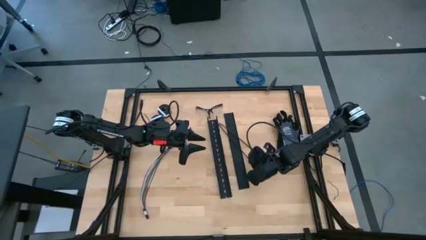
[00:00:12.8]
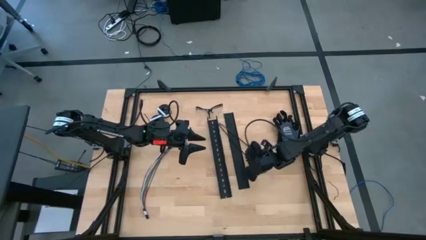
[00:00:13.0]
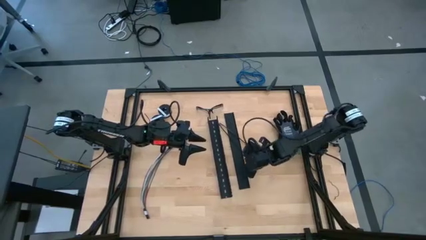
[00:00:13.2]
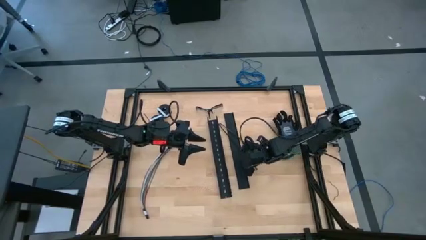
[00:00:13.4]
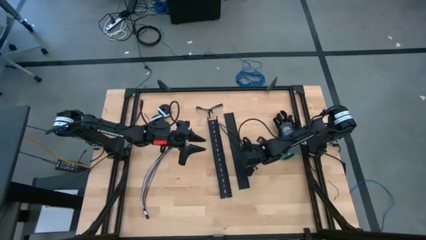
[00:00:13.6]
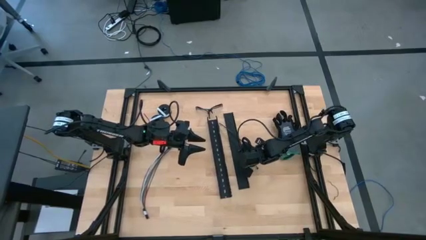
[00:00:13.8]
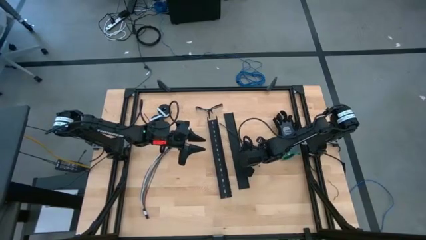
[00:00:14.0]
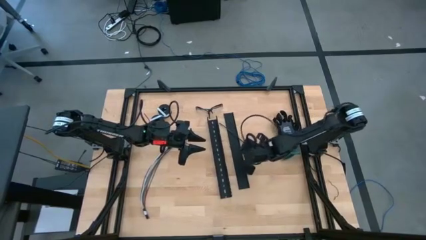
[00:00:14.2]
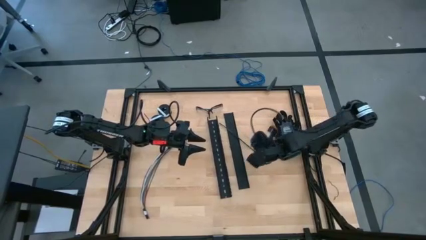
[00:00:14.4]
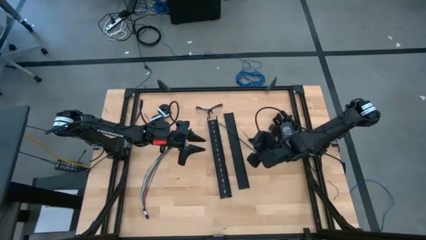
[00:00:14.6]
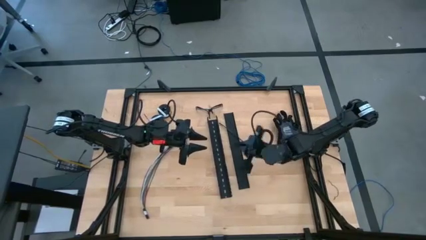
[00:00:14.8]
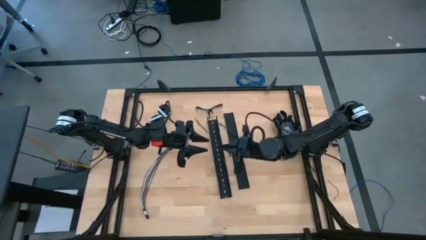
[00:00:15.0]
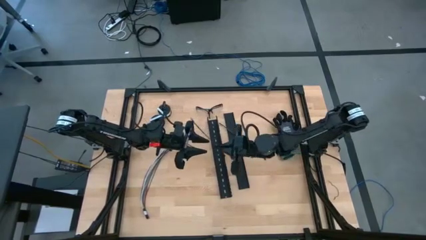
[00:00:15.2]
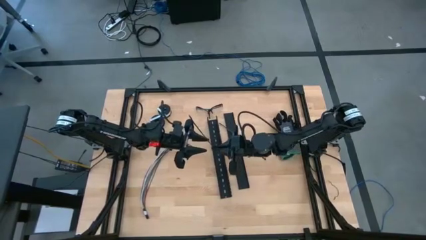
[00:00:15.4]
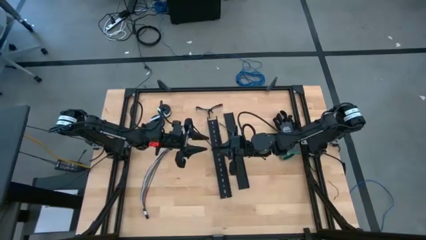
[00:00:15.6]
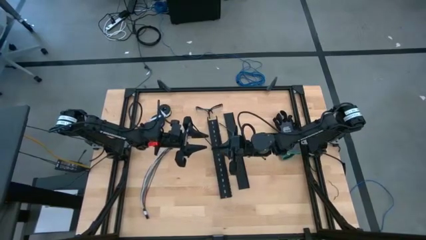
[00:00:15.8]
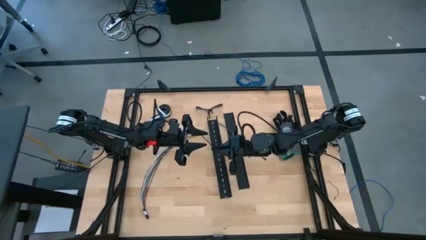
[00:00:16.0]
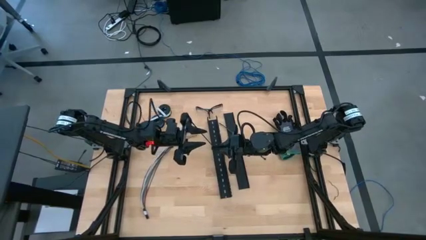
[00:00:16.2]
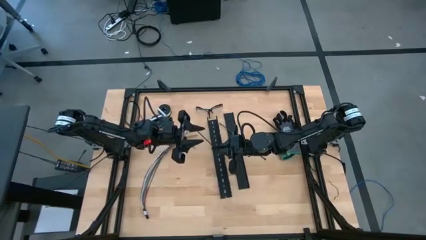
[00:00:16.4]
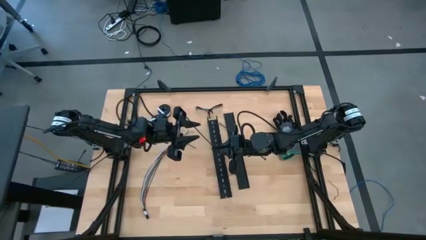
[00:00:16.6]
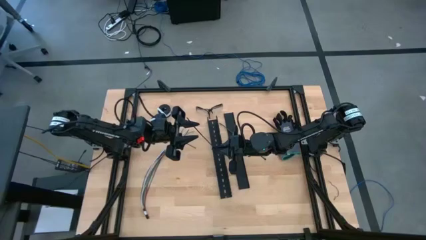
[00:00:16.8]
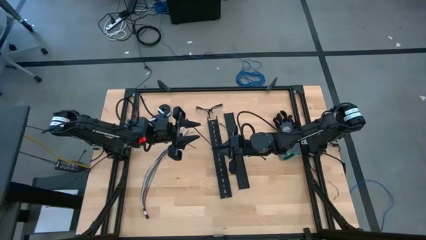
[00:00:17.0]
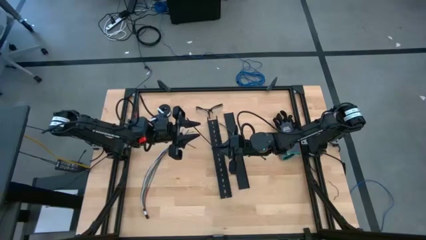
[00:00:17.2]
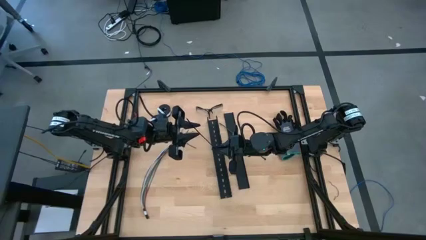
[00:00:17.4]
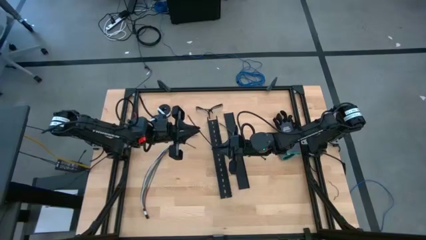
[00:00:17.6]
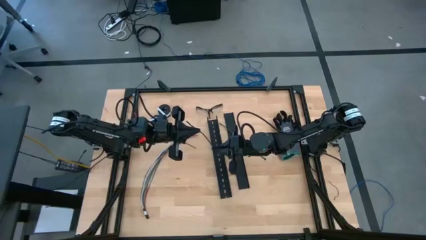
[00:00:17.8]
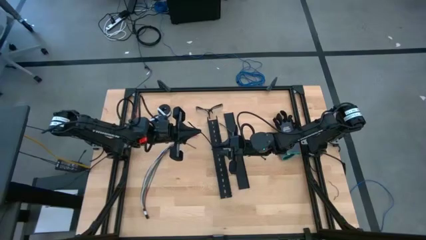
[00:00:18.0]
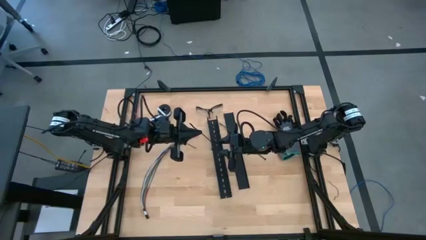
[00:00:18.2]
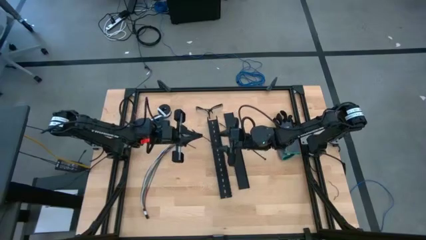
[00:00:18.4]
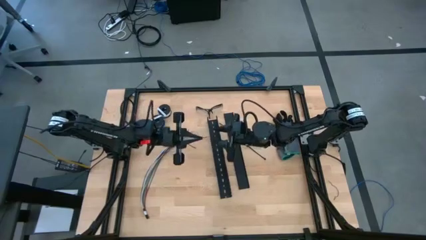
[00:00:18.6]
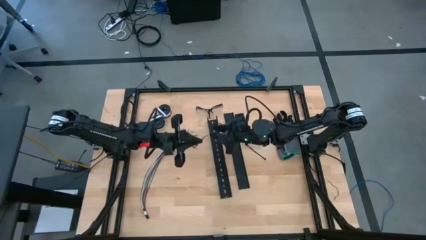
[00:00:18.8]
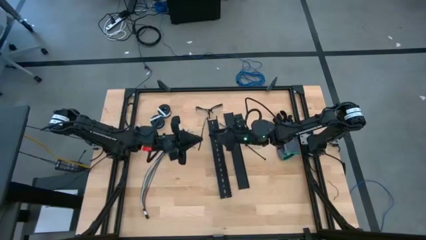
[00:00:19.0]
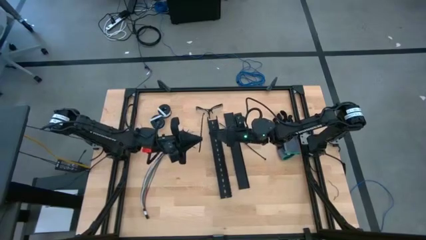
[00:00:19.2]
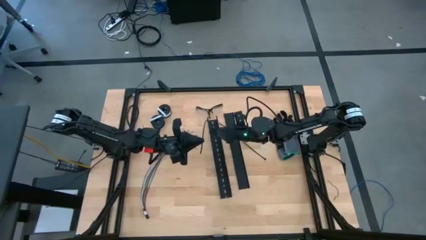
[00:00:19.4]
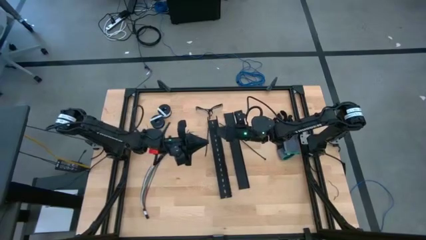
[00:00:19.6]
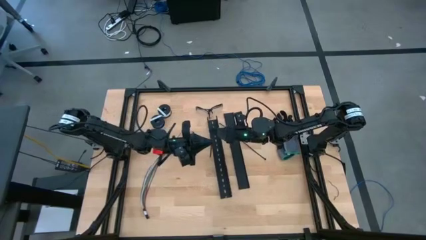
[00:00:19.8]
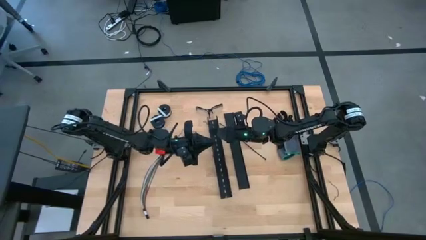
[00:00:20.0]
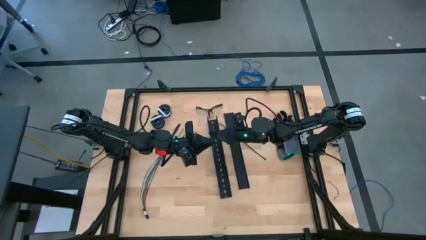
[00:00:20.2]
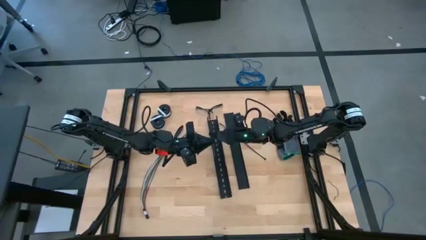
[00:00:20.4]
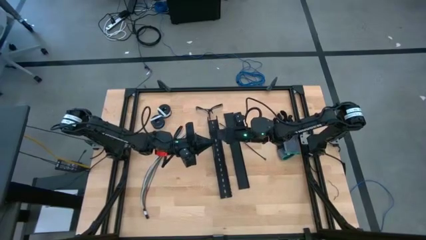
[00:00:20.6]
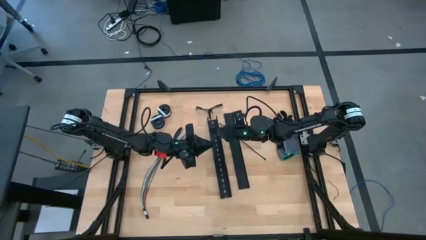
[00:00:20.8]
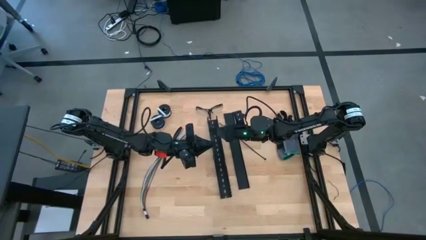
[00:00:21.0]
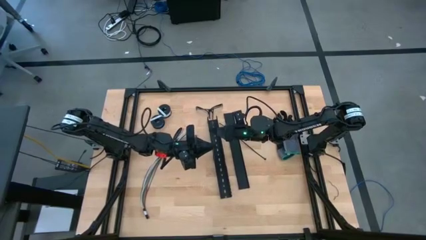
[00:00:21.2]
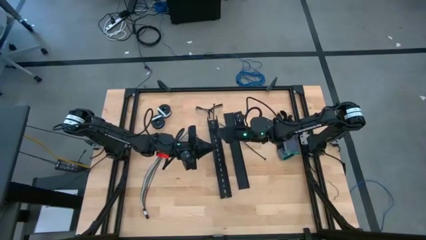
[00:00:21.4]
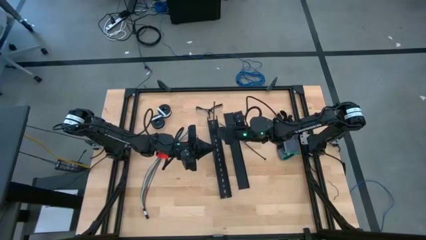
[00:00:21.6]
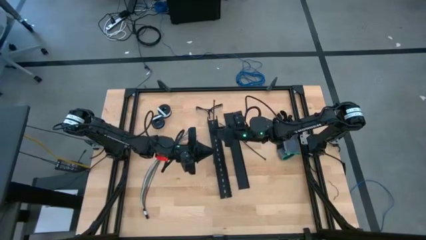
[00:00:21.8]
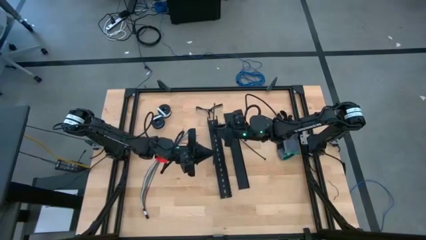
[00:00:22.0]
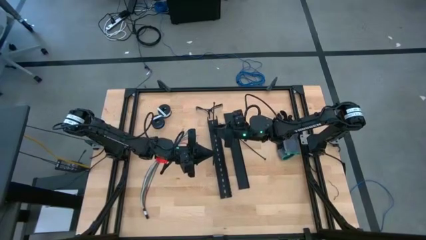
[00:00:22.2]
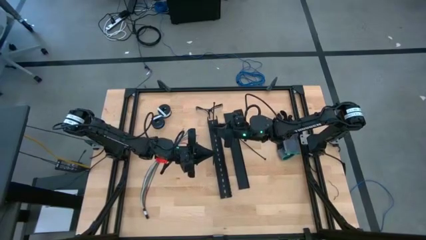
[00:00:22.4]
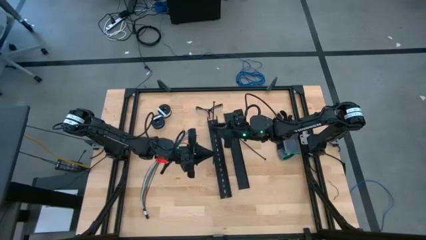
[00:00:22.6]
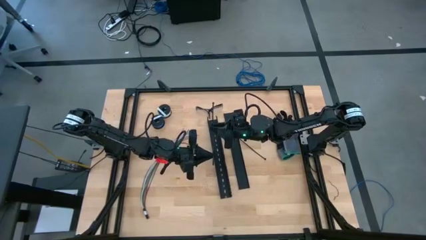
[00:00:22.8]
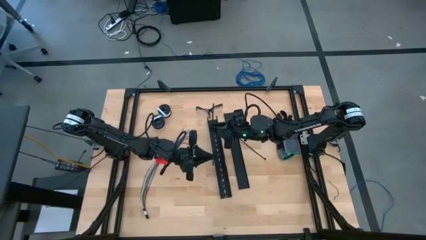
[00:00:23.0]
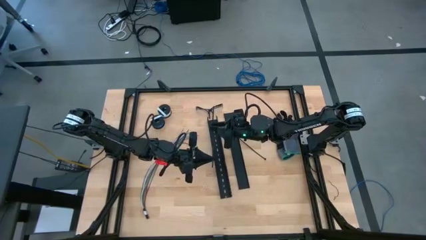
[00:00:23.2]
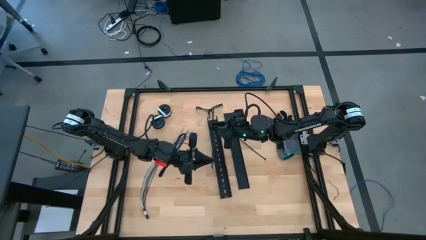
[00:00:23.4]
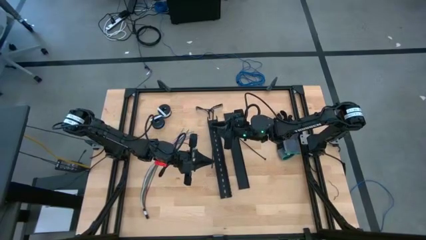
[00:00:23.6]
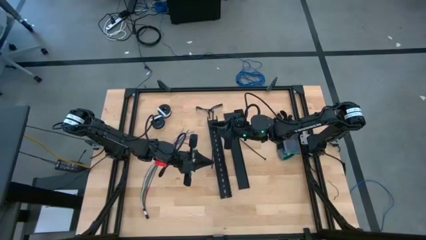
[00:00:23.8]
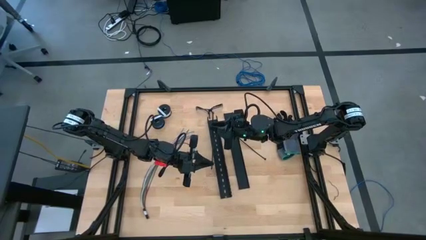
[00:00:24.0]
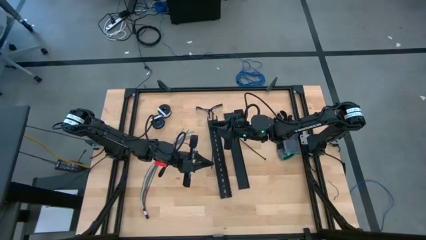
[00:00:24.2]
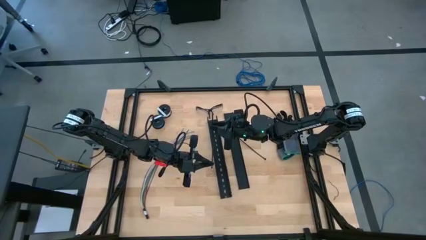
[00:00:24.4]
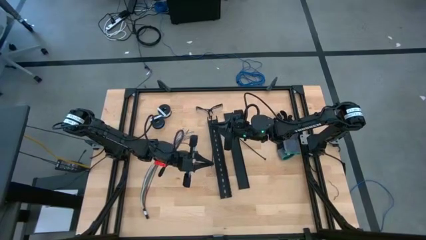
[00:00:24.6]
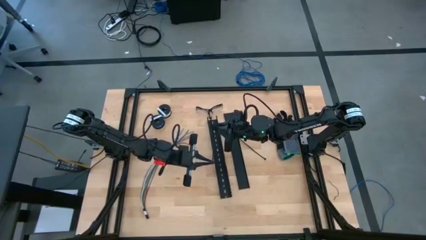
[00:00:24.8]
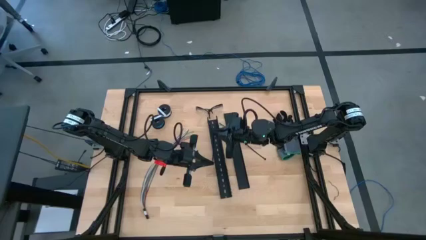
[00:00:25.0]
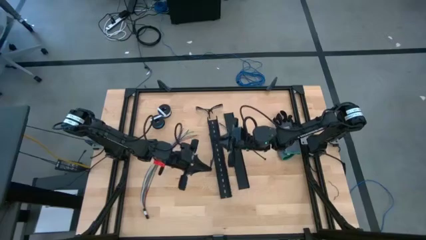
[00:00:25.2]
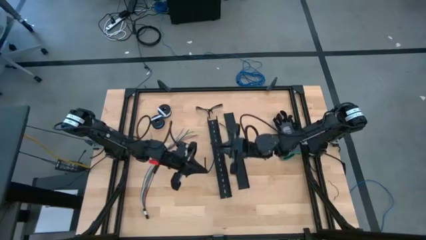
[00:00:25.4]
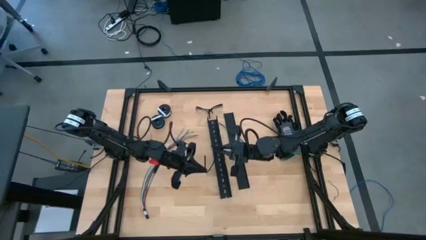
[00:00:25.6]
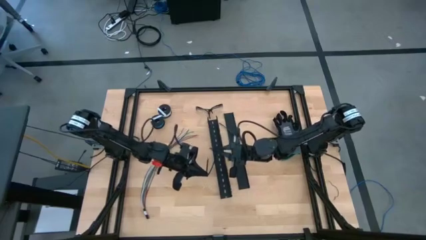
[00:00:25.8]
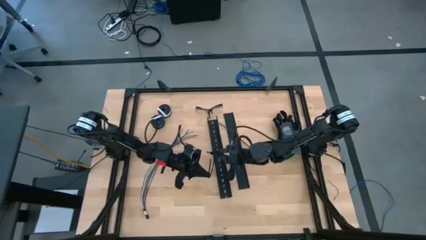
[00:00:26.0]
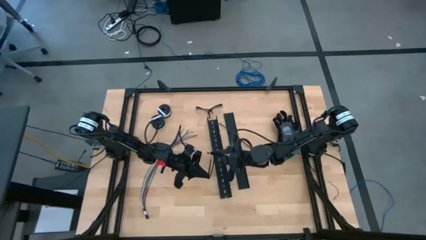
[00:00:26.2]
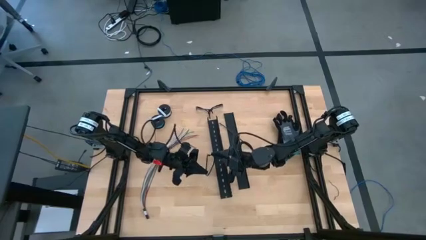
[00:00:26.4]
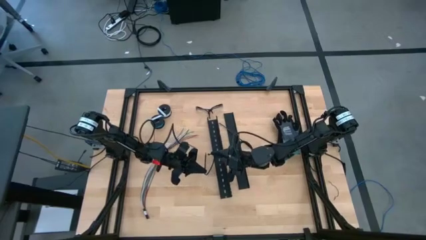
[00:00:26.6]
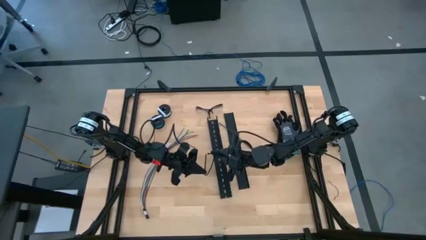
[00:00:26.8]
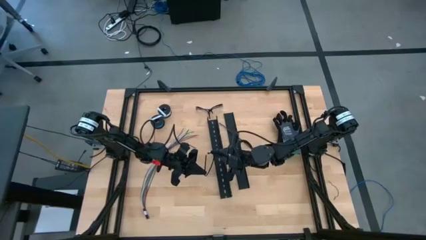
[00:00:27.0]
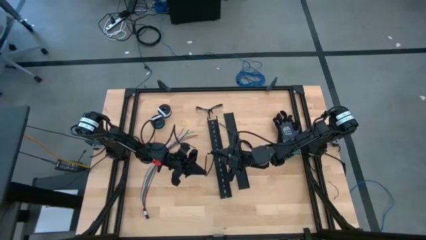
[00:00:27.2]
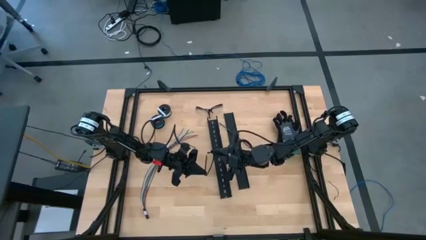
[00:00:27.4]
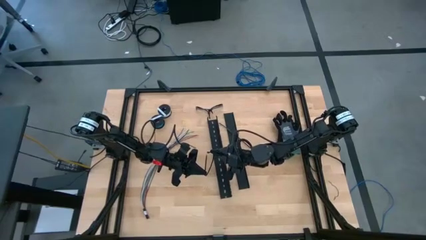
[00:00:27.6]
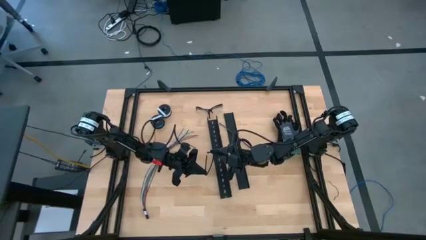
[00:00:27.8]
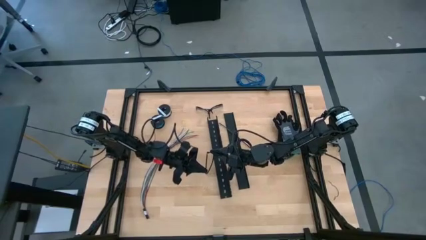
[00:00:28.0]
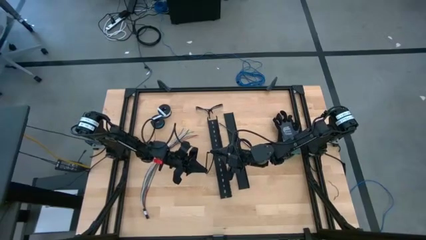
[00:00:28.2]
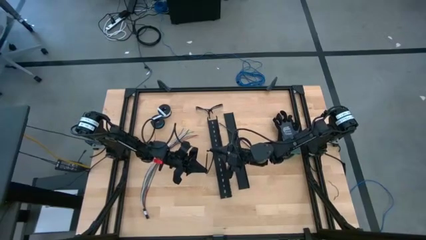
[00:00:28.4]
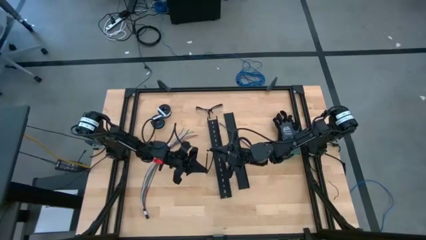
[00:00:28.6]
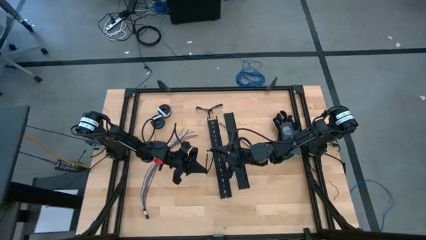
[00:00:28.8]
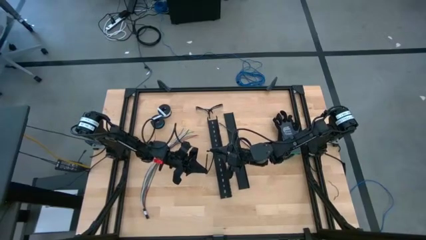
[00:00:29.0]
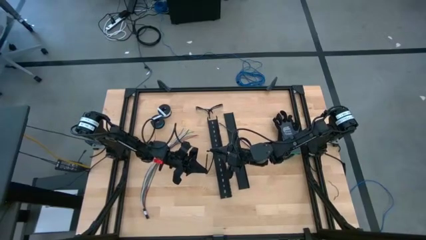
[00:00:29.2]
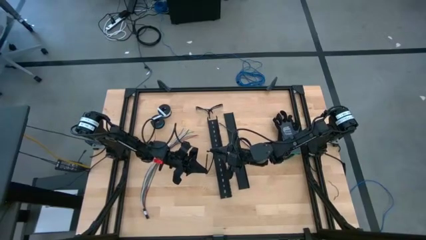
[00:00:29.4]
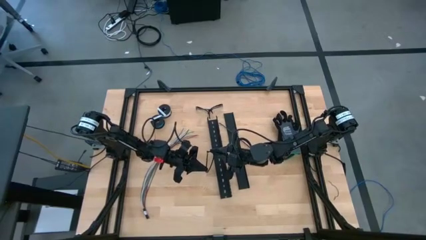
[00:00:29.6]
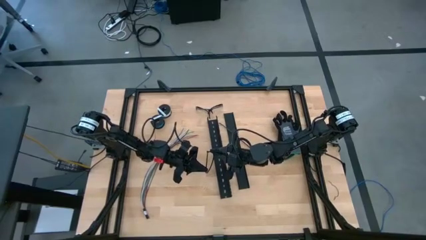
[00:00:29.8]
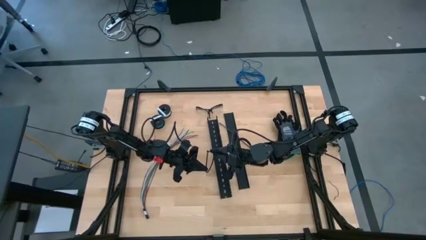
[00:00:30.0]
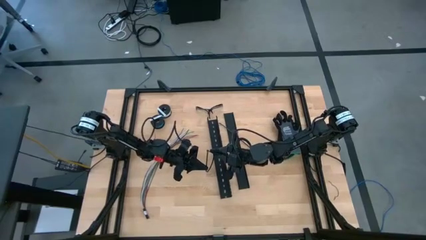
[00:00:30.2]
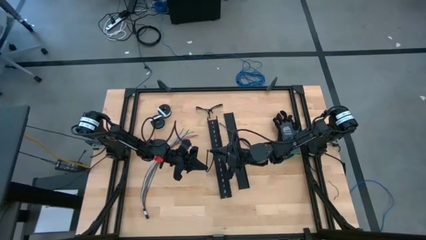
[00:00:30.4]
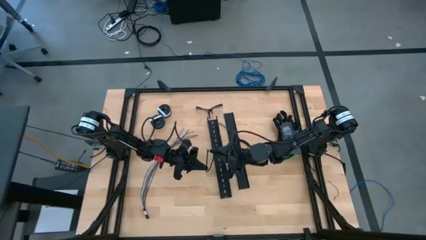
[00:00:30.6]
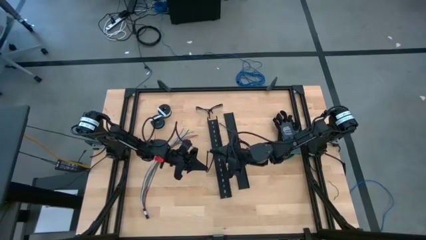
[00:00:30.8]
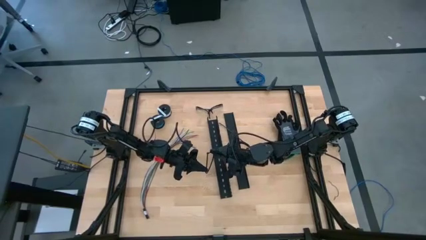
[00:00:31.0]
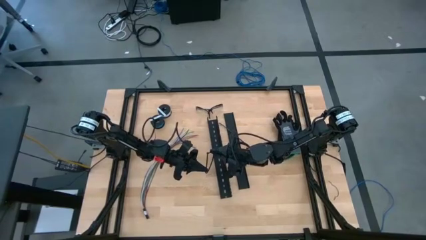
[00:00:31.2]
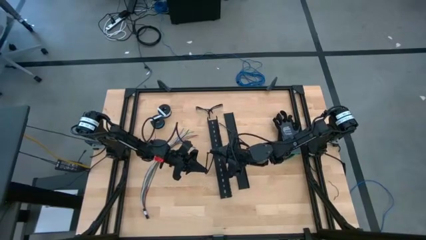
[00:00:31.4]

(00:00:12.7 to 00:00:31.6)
Task: Ziptie cables
Wrap the black zip tie on the cable
